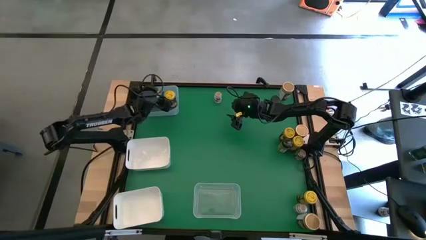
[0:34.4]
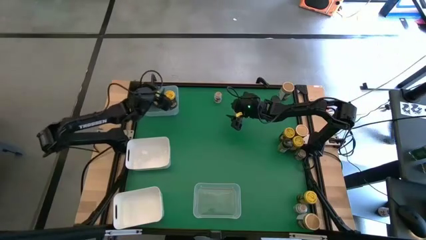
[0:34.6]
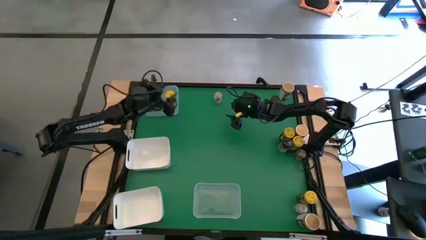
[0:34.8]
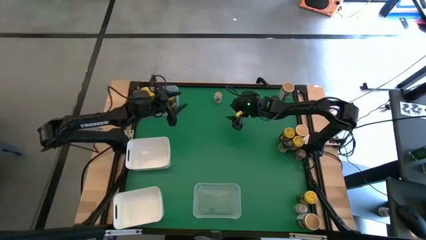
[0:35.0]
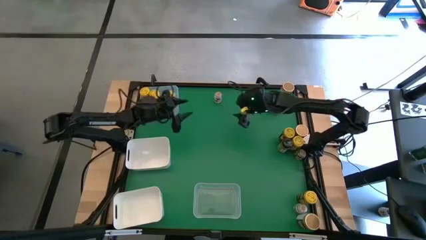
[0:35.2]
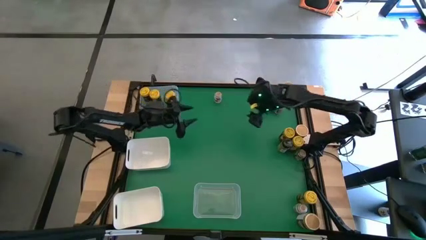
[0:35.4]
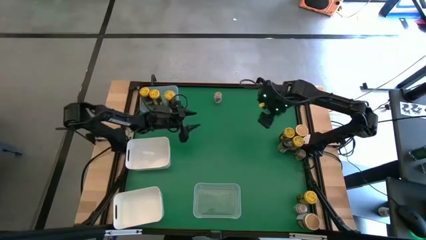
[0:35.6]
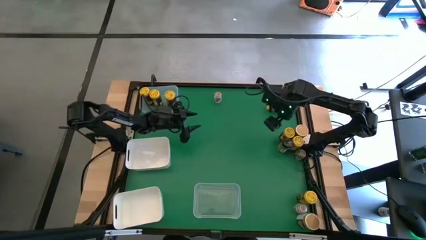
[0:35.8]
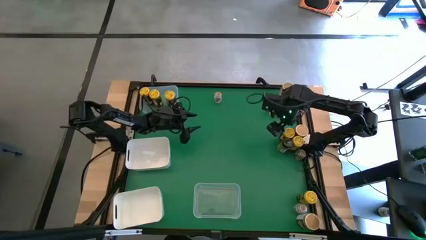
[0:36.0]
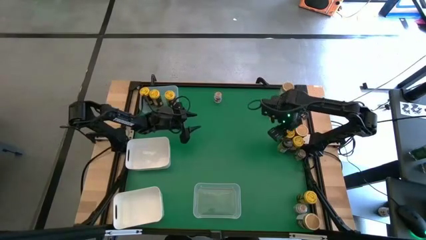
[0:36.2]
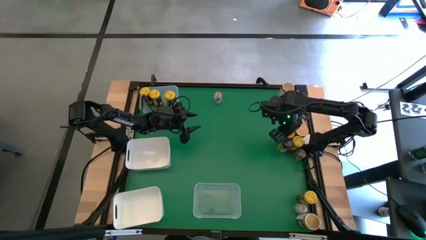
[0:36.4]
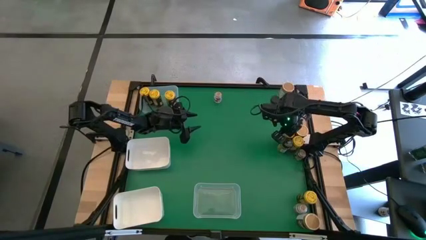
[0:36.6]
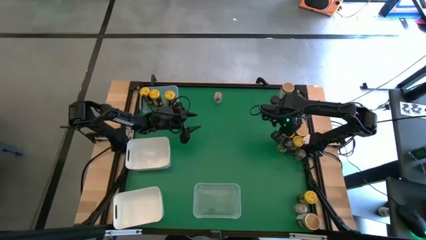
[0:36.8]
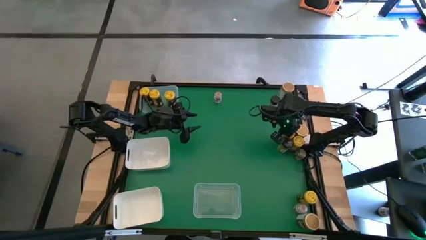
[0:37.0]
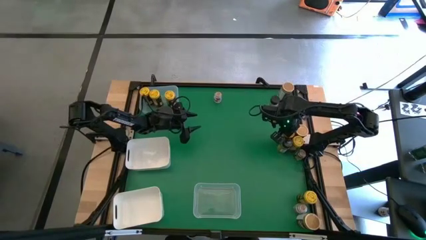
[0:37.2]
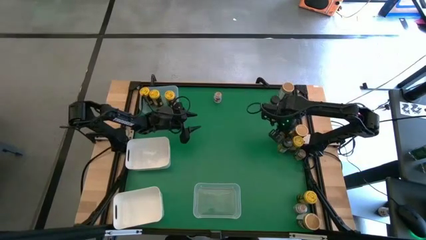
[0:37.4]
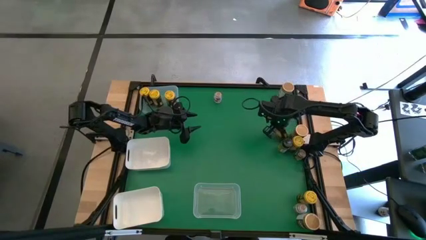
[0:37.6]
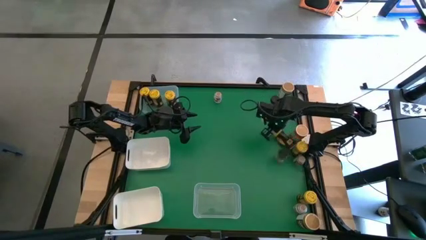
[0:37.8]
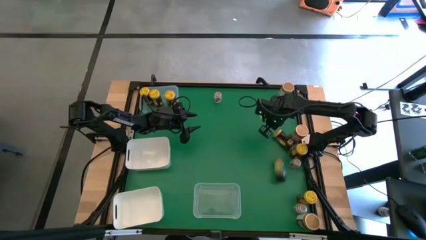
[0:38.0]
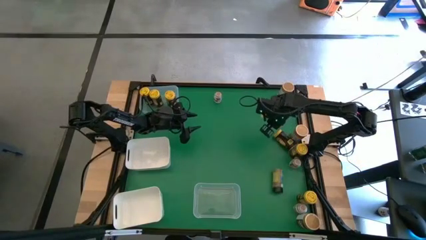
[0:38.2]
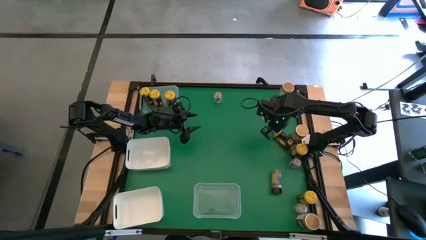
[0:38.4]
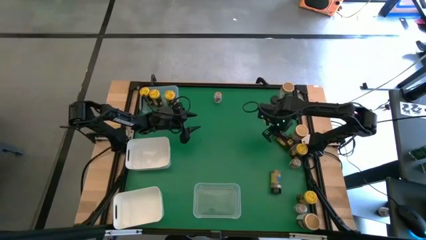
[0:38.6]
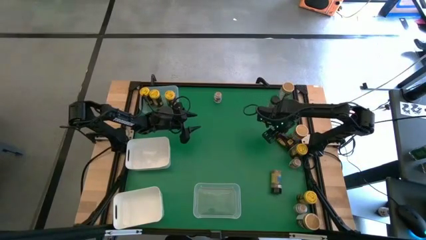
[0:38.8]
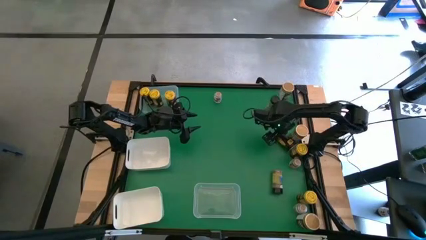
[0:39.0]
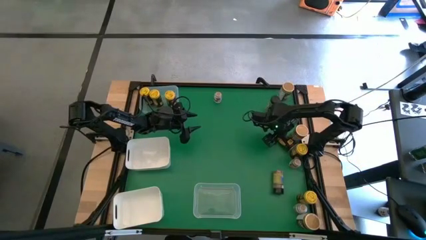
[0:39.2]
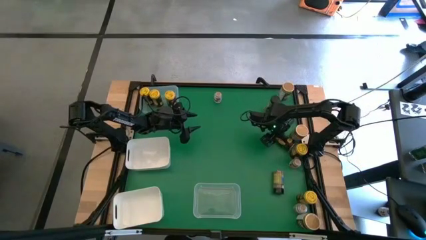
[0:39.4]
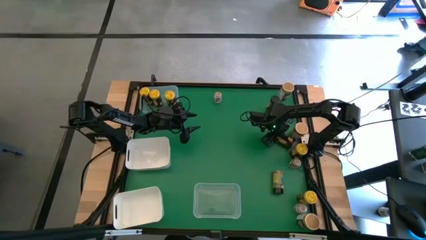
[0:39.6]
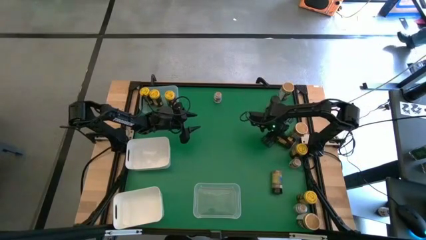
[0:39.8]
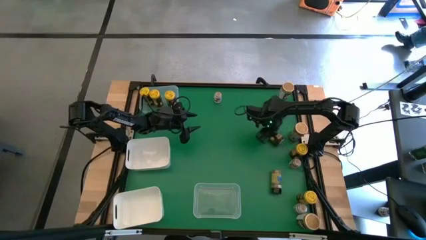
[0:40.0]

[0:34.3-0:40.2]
Task: Sort spices by type
Put the yellow spice bottle into the top transparent bin

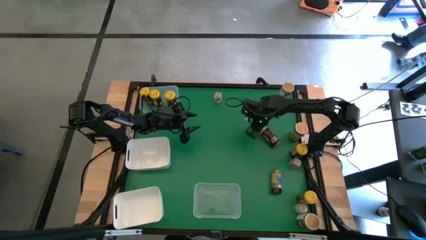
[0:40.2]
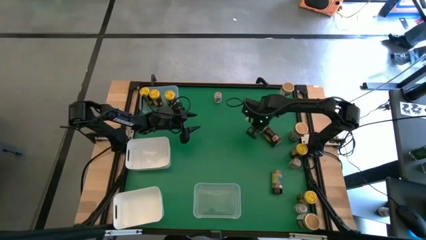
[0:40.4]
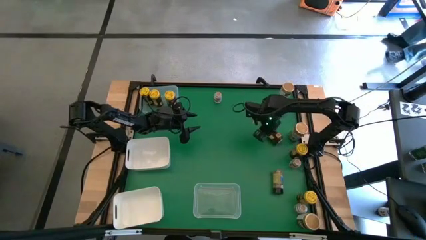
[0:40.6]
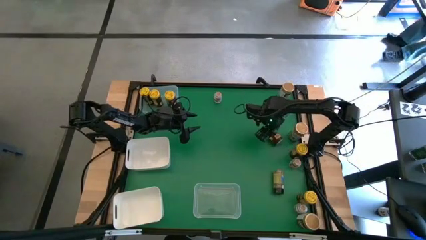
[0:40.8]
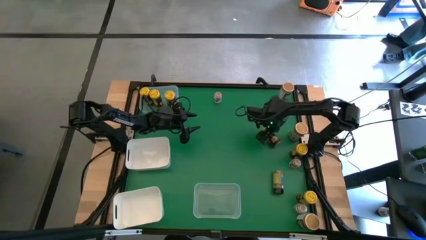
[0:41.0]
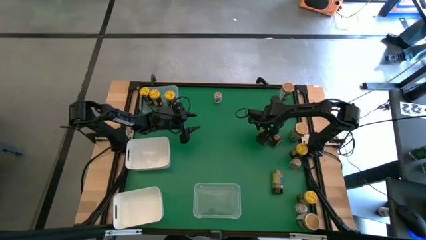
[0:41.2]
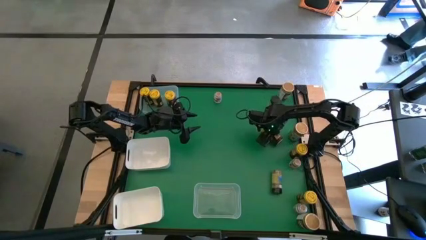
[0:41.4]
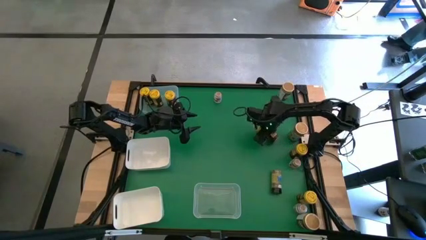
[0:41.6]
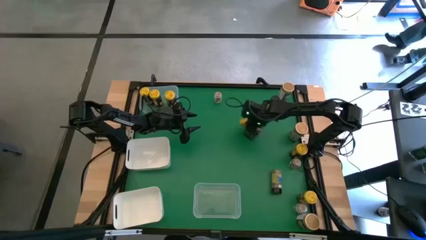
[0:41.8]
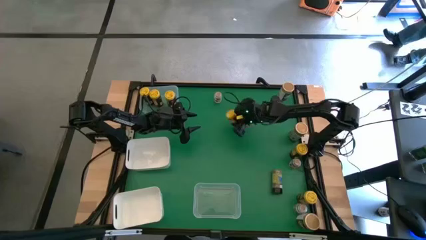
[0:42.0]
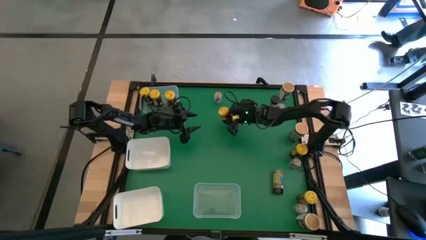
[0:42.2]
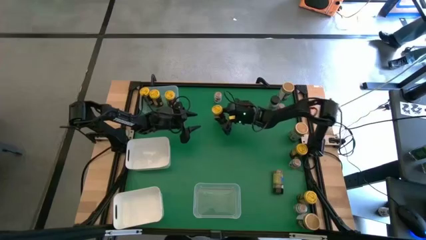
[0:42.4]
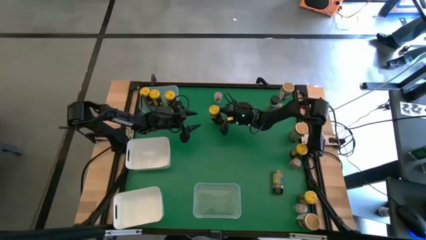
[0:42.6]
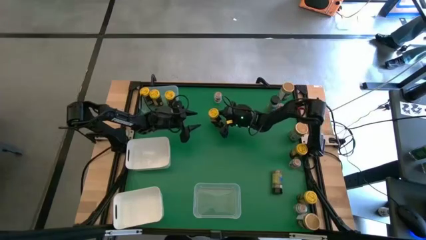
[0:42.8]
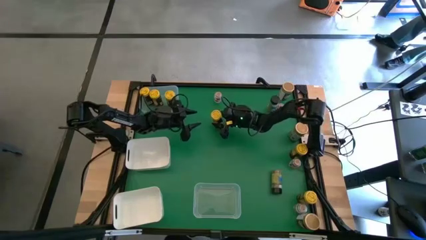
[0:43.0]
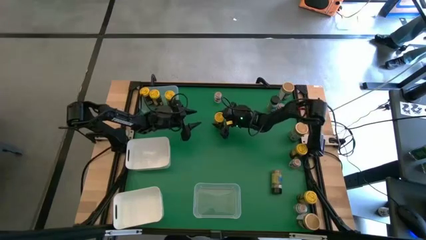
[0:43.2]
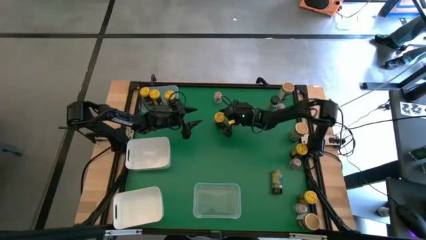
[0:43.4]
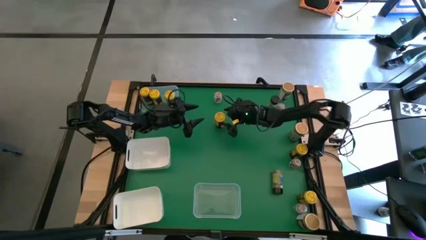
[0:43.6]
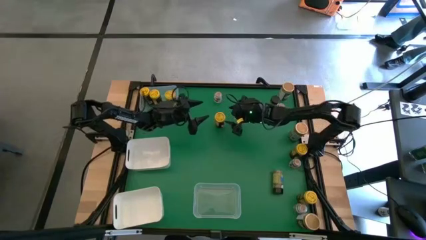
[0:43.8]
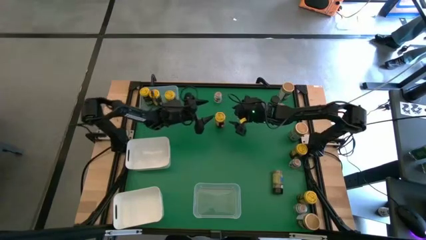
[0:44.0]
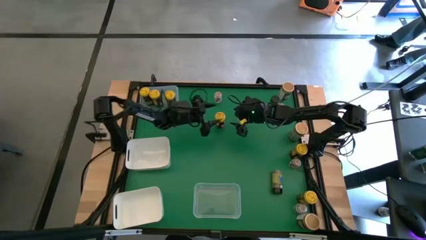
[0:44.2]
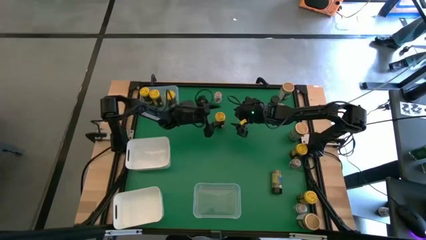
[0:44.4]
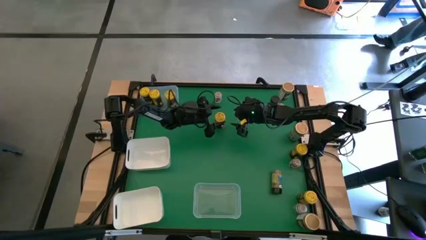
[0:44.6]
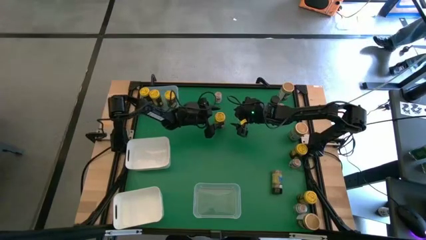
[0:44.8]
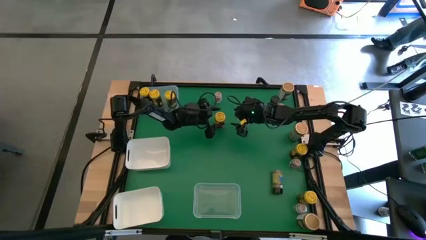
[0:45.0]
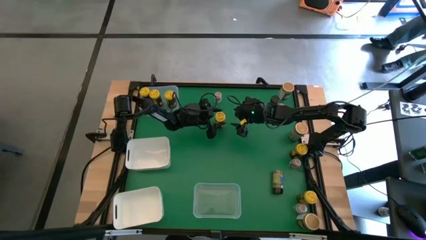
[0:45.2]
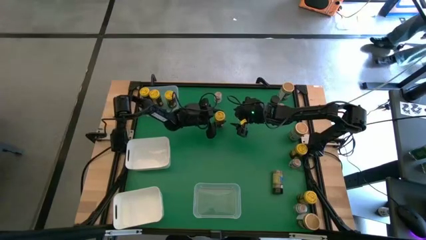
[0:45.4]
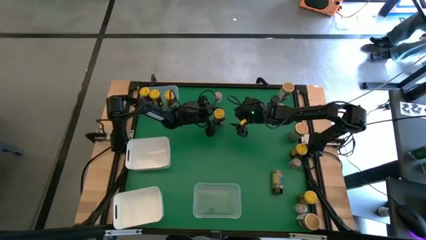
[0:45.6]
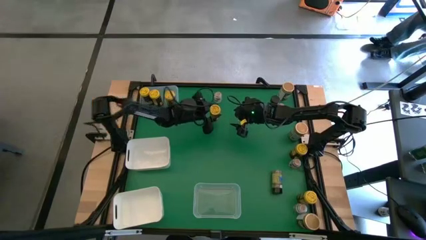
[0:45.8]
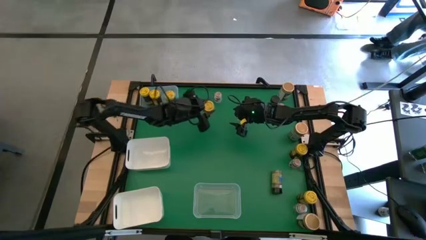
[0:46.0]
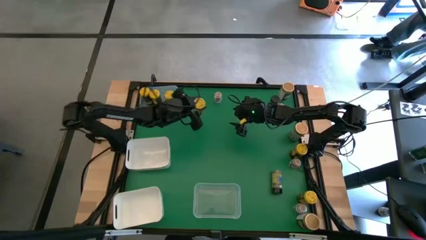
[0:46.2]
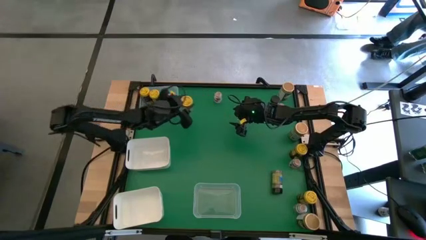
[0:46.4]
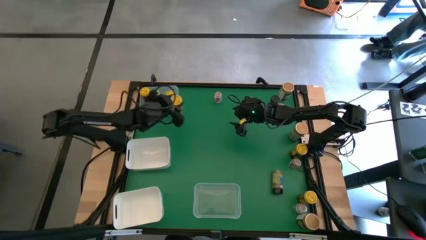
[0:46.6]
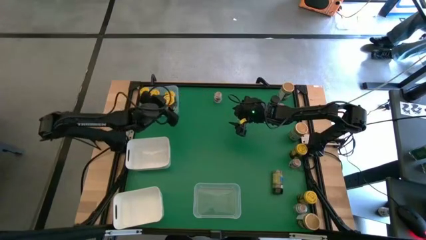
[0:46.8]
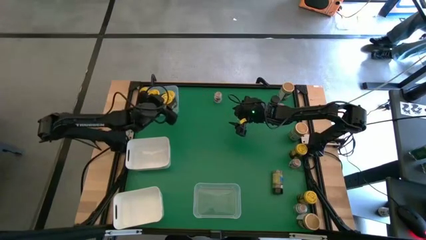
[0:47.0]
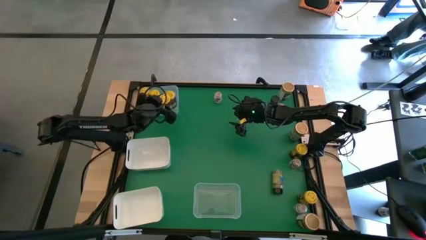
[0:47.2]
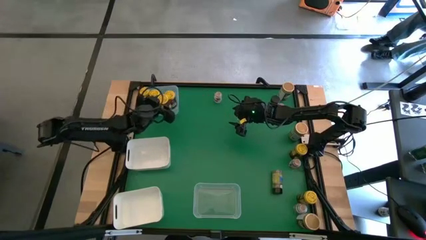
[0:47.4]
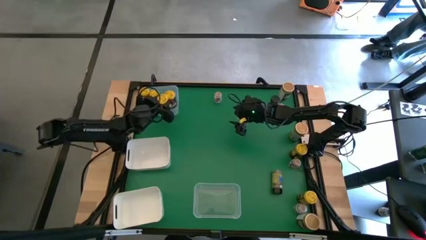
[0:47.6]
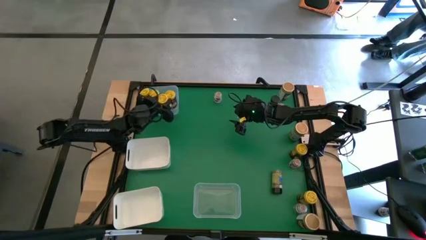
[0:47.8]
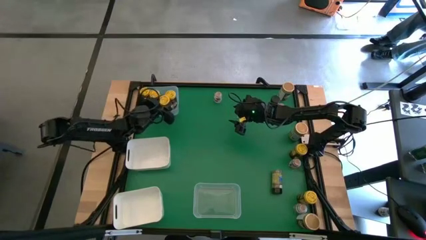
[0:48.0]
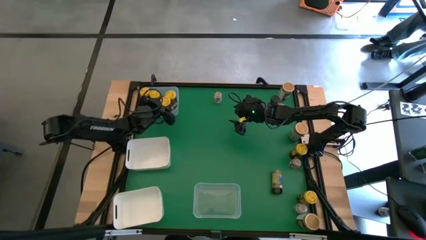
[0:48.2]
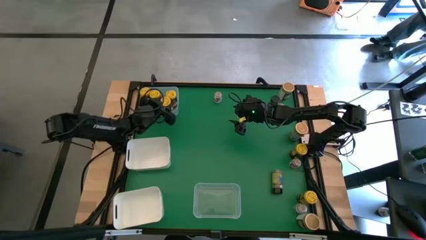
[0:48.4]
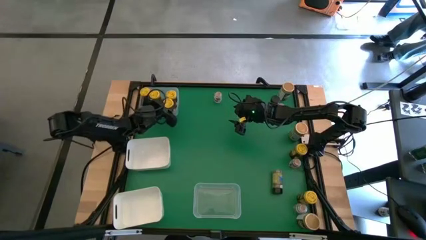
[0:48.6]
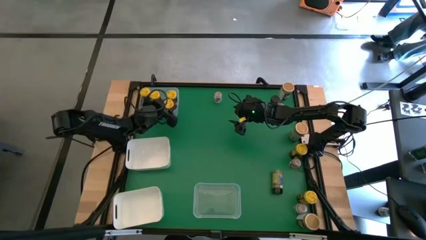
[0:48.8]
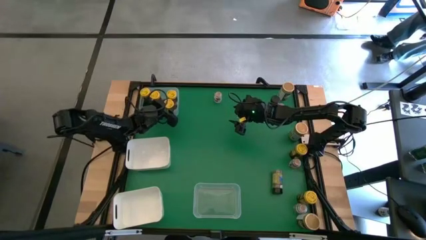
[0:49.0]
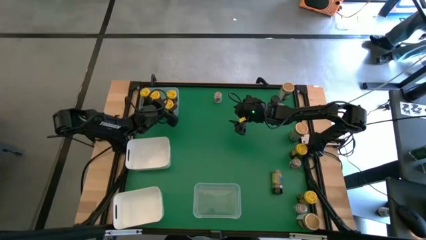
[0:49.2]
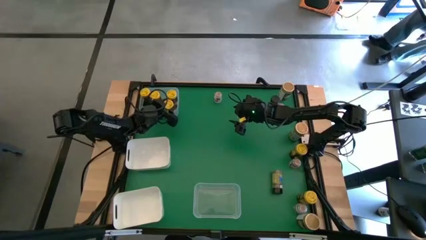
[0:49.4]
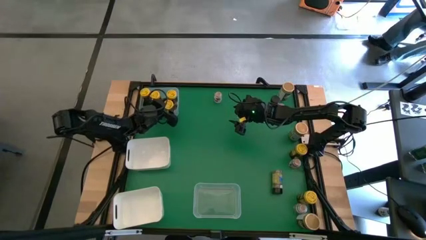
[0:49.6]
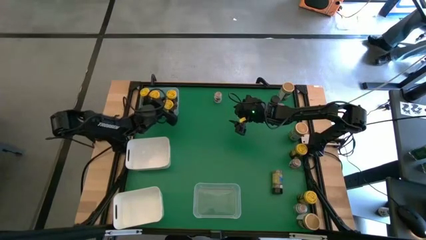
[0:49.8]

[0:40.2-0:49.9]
Put the yellow spice bottle into the top transparent bin

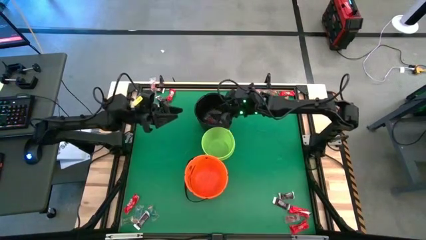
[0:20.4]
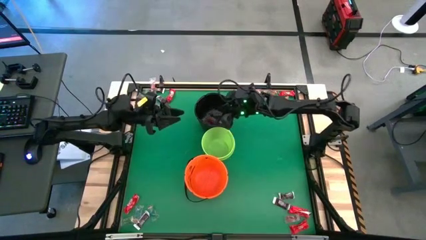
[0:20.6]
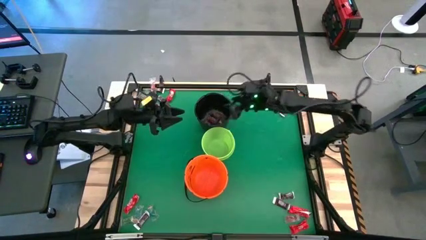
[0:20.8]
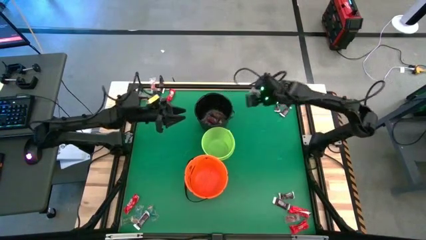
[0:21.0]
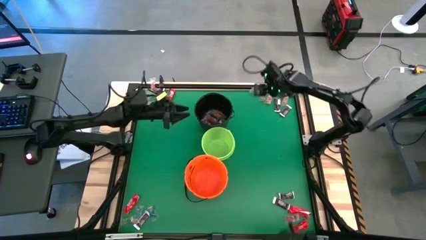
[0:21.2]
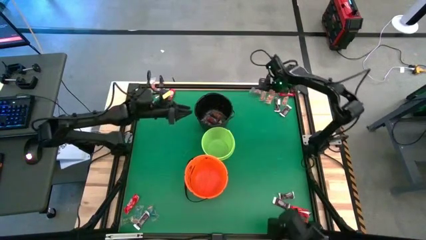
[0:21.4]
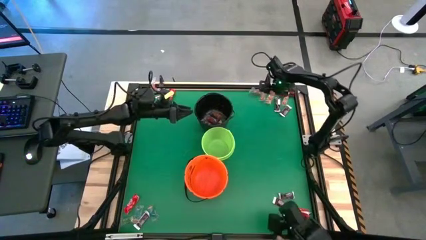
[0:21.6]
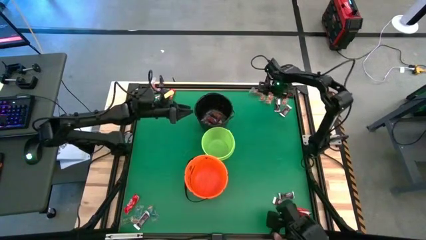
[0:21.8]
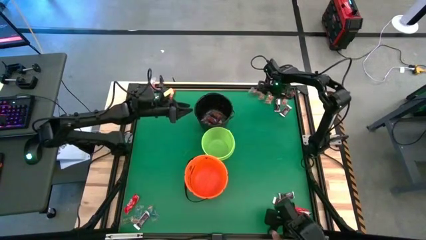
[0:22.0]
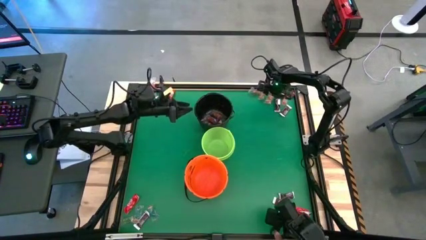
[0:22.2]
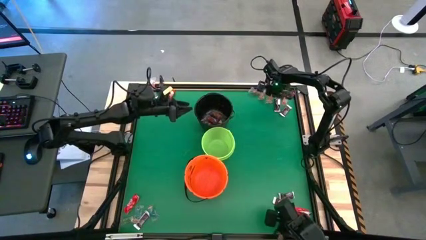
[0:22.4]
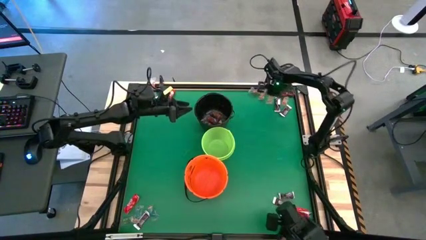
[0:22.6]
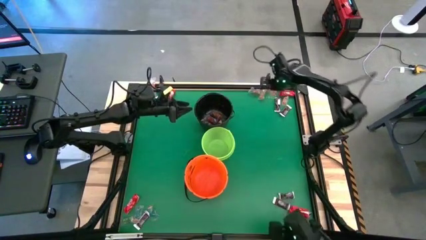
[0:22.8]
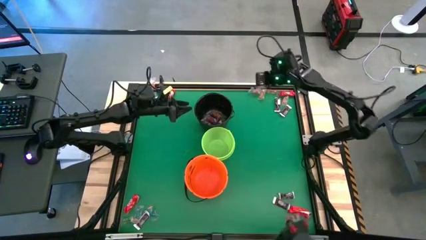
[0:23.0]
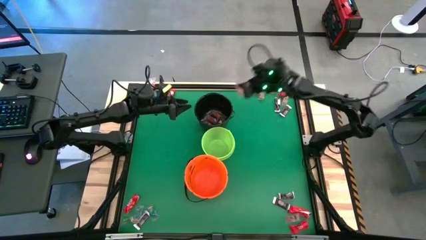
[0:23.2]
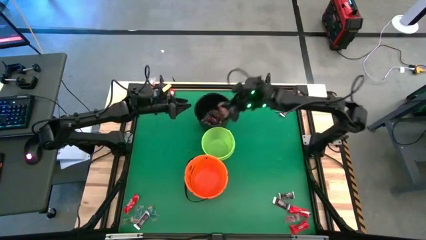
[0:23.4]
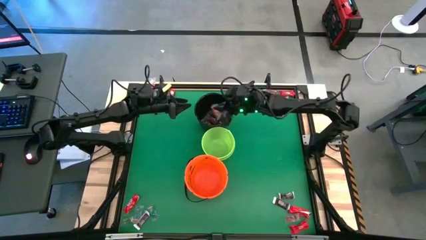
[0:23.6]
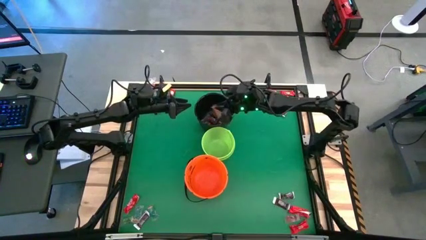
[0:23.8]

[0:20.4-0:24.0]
Task: Sort candy by brand, put in halloween buckets
Put the orange gummy into the black bucket
